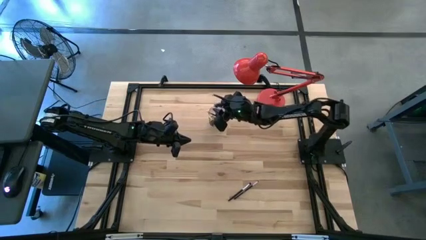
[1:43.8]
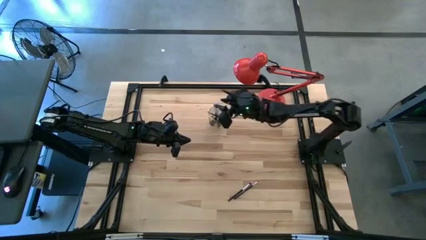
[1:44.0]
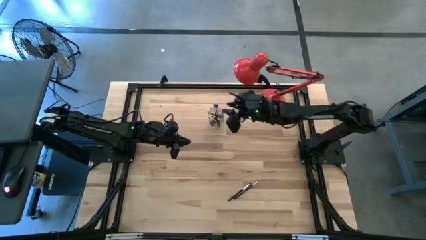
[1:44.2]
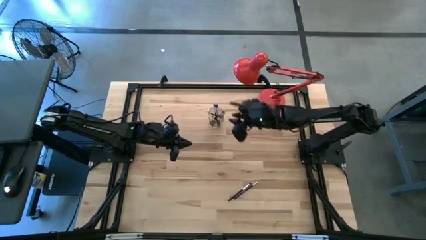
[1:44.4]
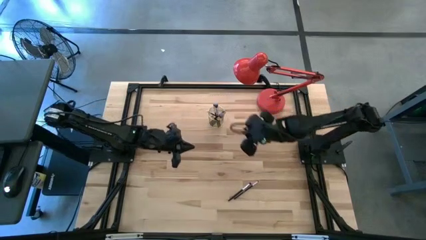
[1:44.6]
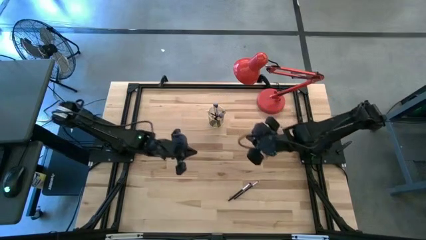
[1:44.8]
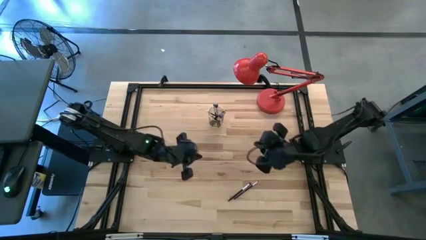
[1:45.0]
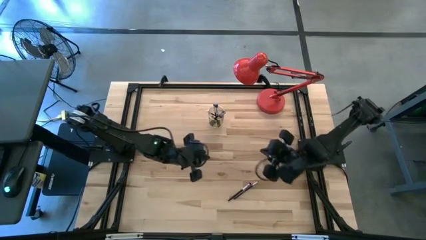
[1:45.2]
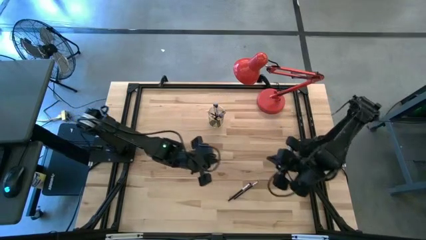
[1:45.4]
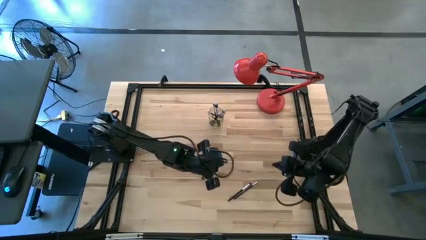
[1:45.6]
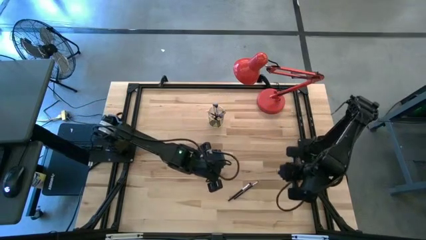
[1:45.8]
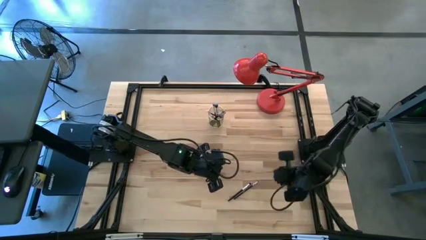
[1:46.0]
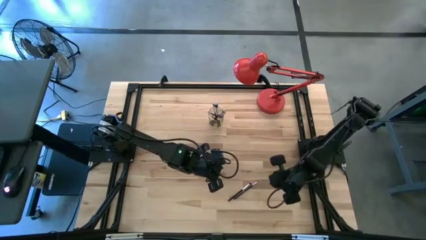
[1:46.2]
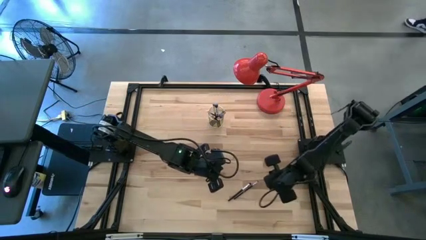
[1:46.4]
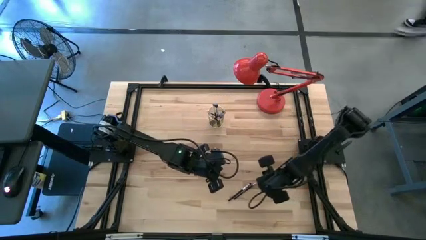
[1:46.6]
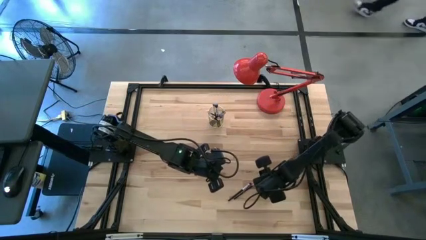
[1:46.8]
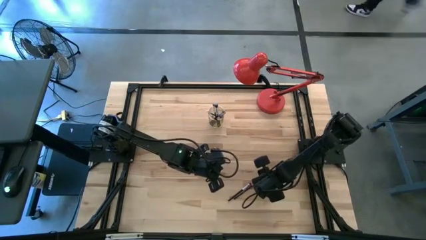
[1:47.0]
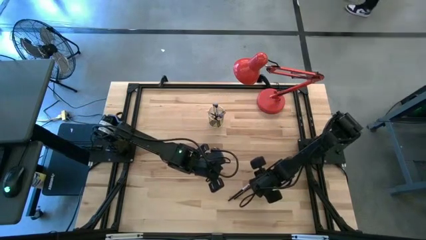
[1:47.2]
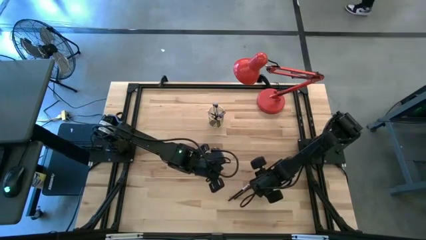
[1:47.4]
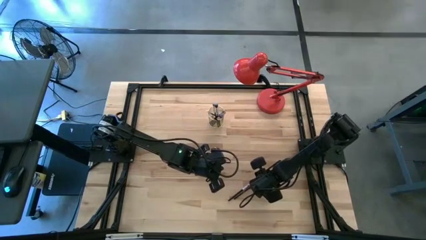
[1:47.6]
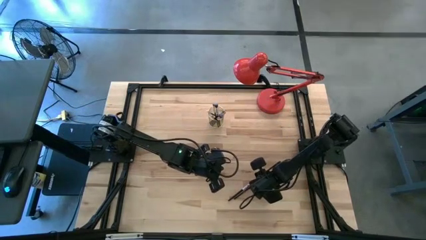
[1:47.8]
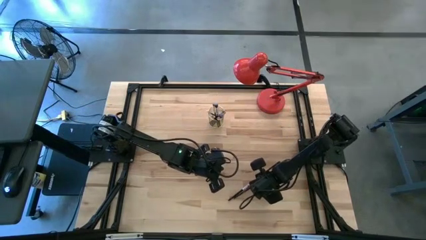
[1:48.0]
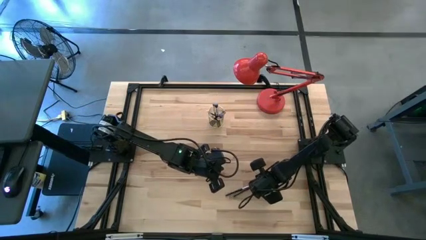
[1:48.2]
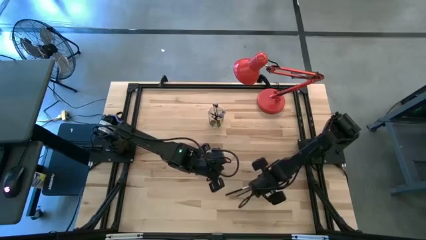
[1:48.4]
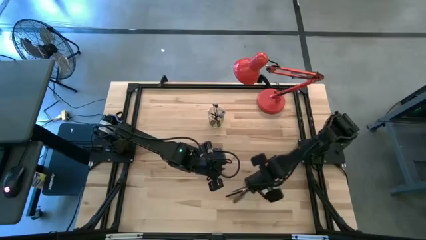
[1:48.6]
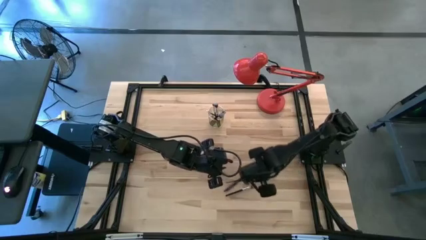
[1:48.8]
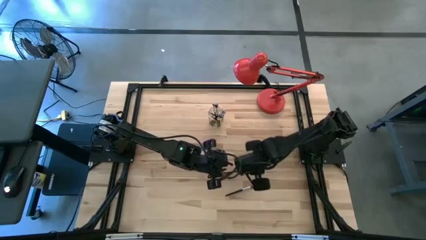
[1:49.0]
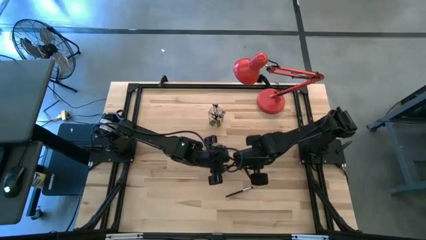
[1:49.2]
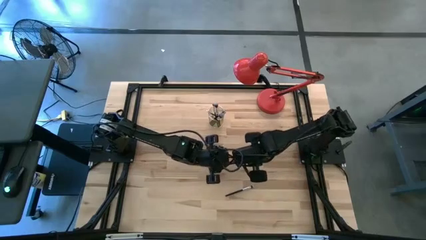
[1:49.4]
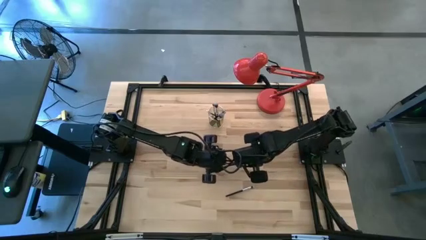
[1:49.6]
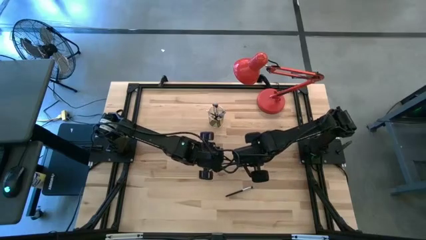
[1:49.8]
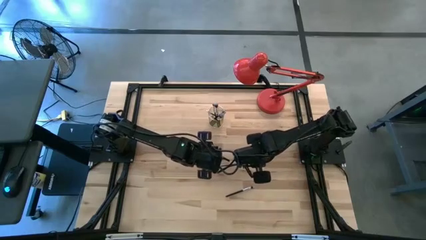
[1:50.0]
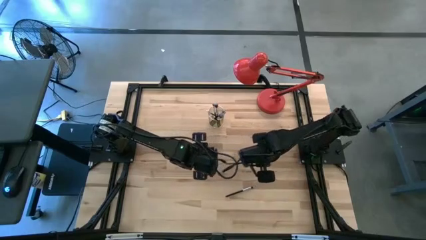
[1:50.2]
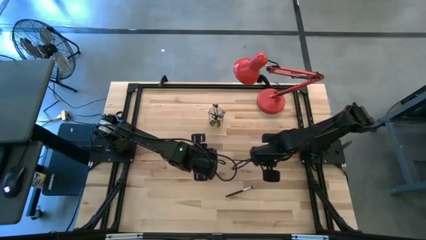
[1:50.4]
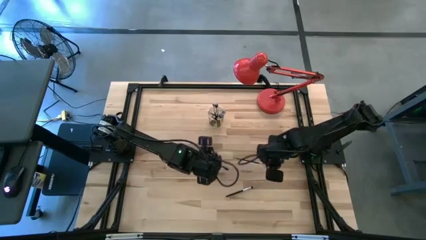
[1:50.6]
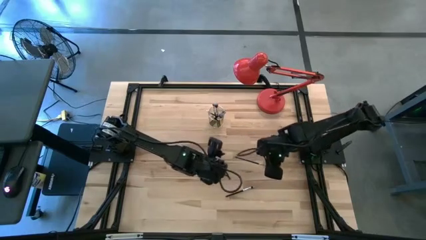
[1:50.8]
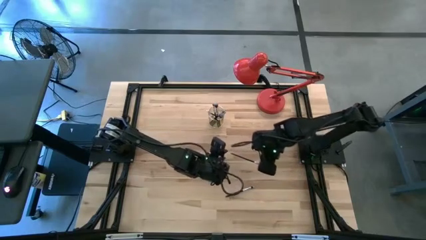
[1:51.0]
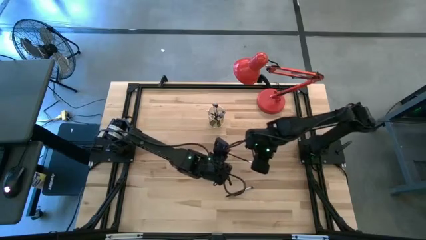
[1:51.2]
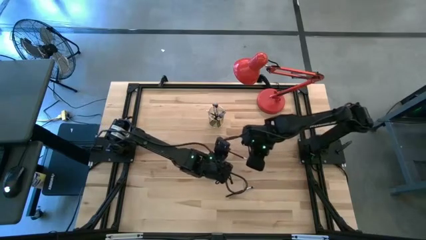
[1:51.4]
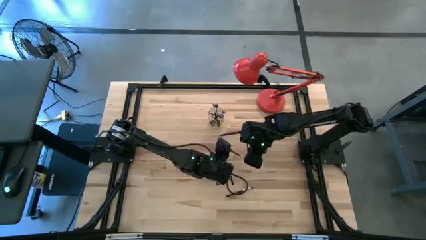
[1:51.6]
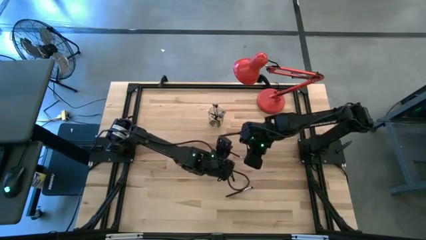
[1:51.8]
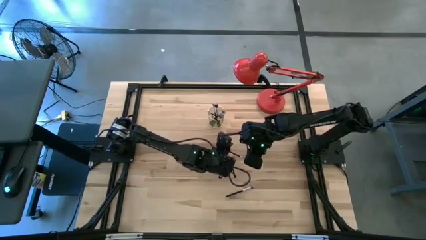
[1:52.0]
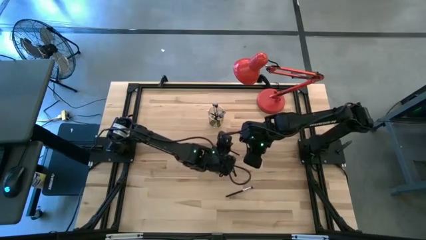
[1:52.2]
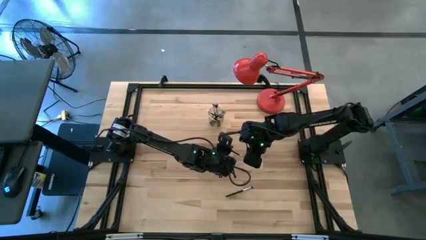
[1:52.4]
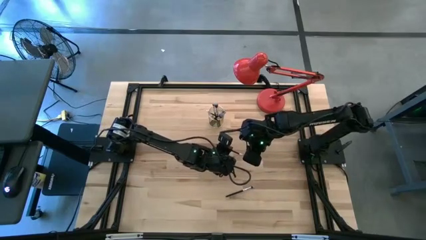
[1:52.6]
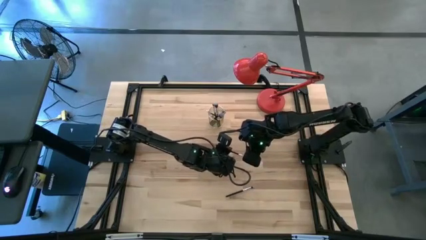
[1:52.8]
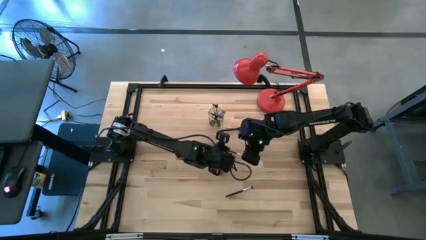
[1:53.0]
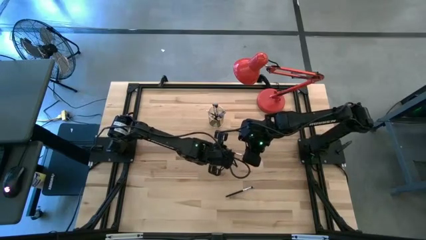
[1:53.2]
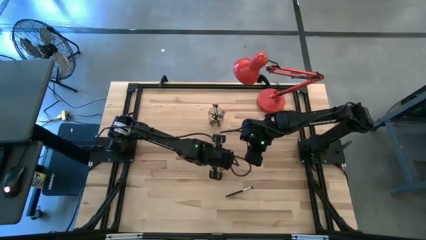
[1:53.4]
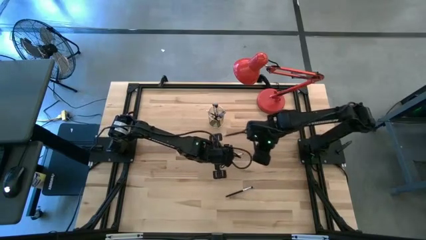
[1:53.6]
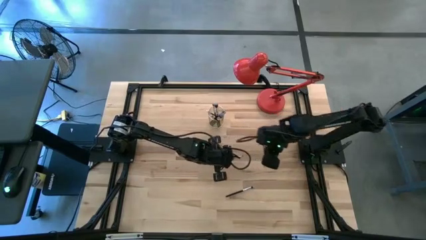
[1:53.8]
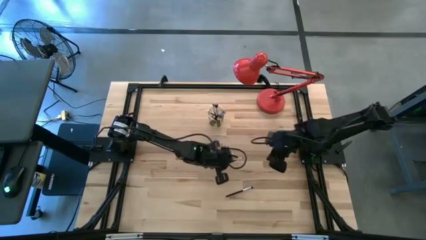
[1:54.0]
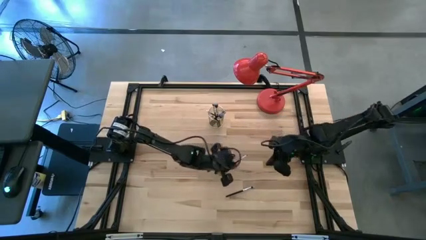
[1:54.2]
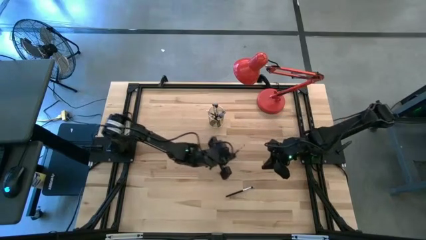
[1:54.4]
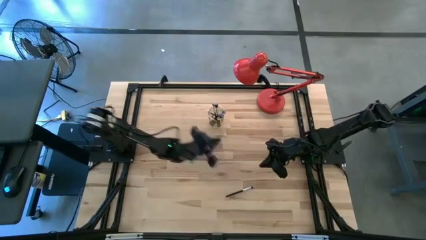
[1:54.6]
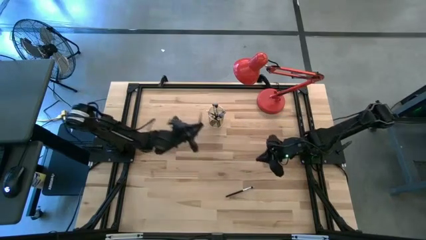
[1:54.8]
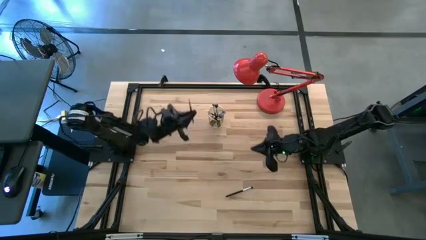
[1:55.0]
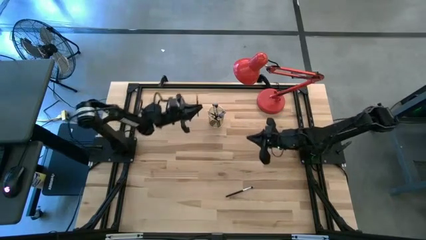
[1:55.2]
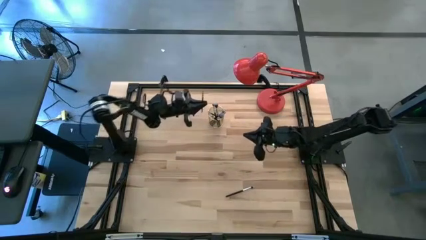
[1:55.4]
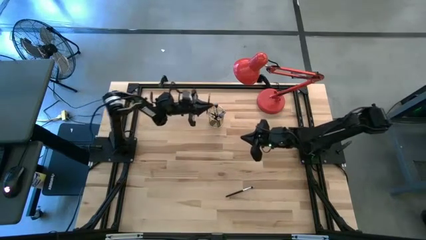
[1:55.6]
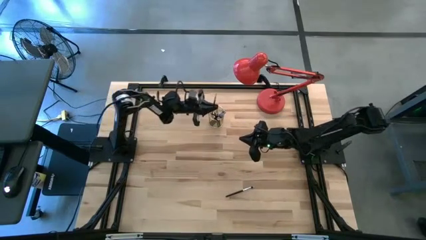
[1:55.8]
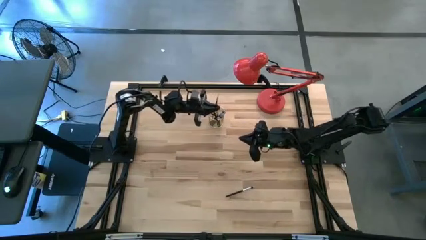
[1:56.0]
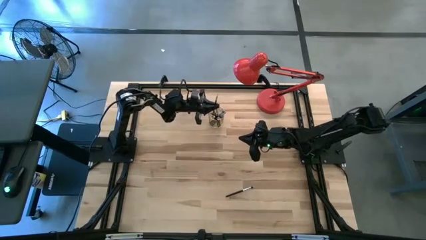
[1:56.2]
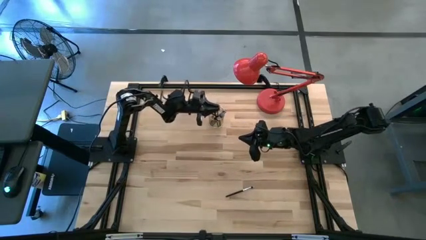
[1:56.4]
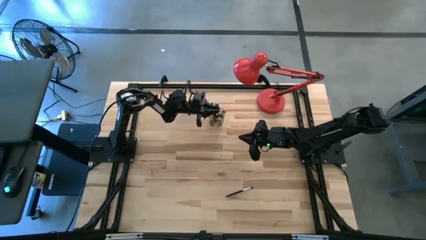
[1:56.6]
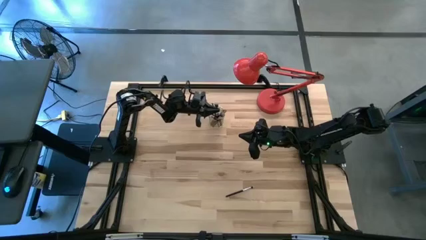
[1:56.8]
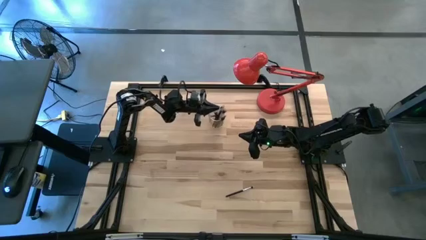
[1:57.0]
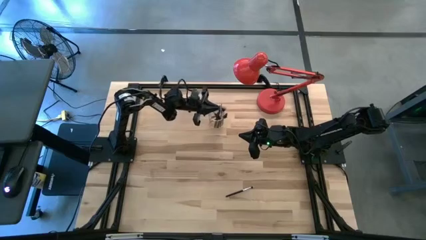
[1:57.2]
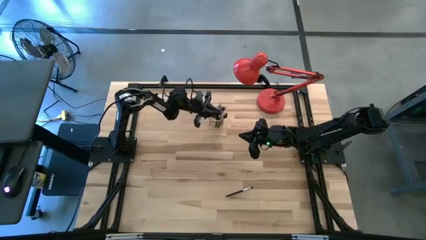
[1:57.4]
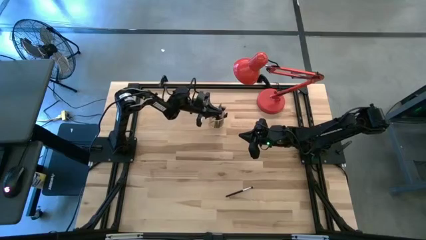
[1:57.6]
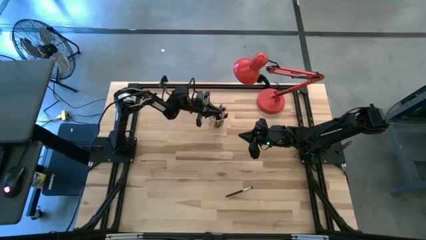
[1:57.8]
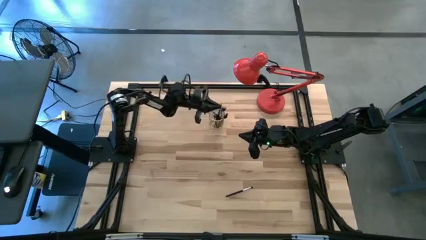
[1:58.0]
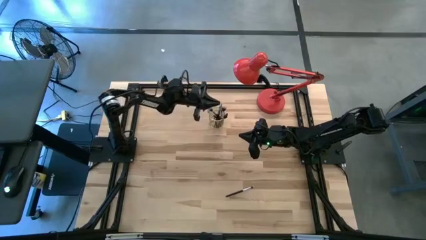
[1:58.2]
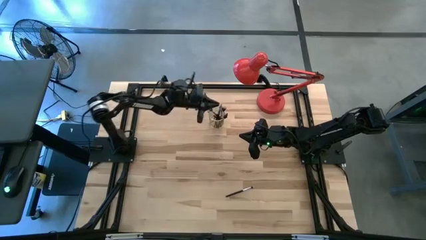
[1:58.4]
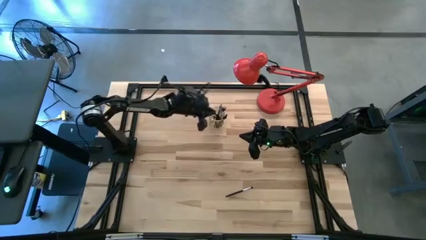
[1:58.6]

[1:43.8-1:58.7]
Task: Pick & Place Makeup Brushes
Put the eyeshadow brush into the makeup brush holder

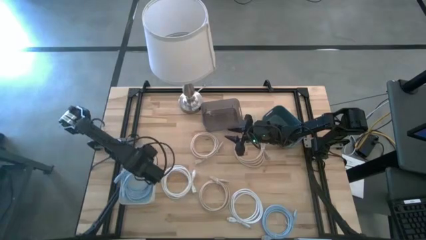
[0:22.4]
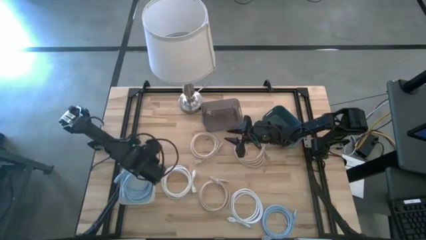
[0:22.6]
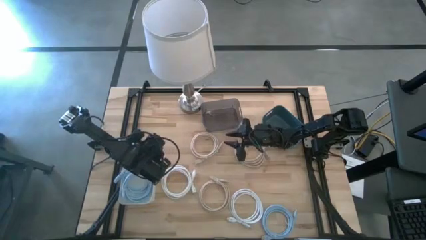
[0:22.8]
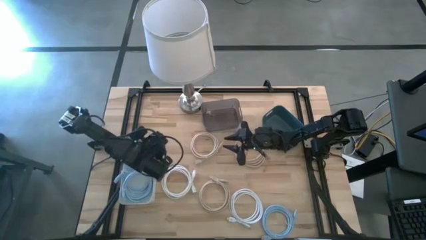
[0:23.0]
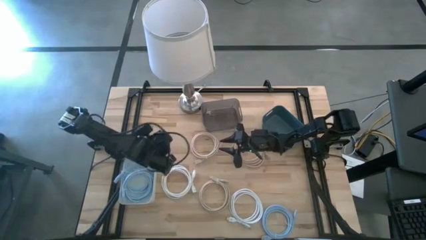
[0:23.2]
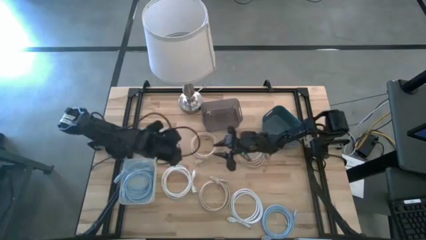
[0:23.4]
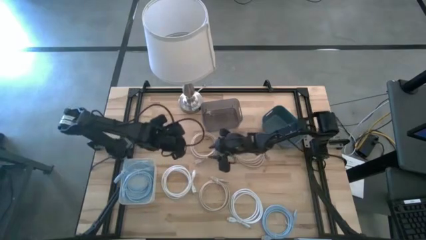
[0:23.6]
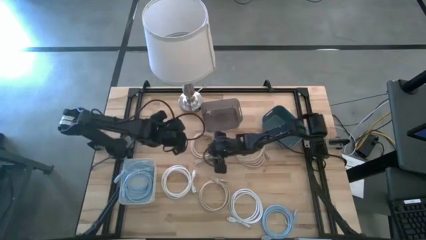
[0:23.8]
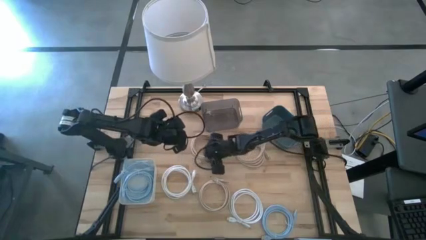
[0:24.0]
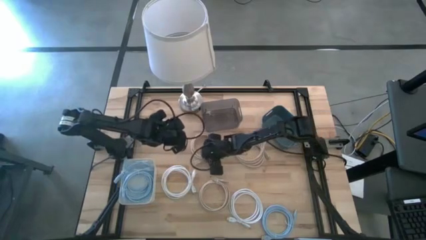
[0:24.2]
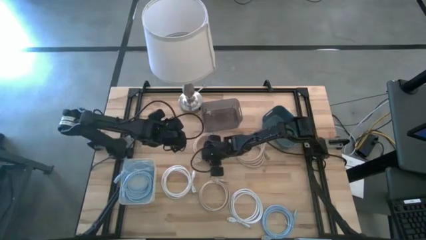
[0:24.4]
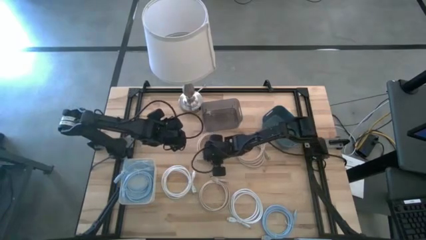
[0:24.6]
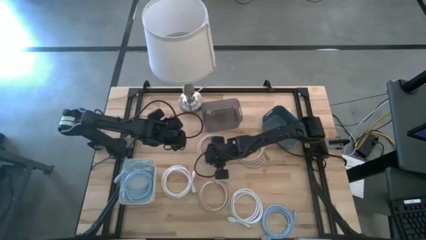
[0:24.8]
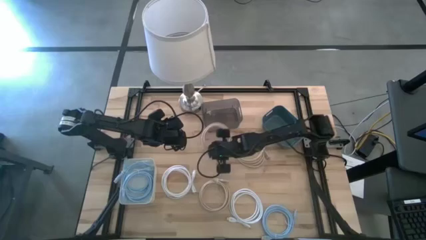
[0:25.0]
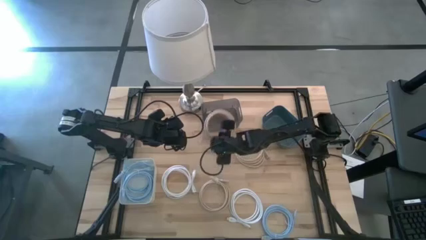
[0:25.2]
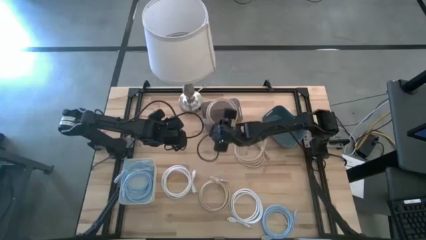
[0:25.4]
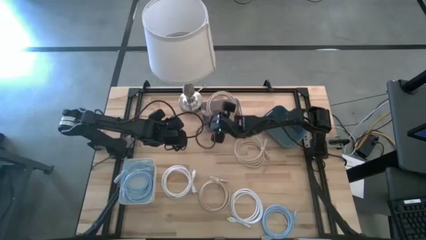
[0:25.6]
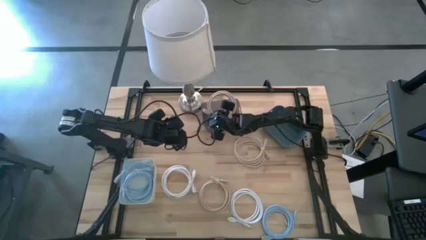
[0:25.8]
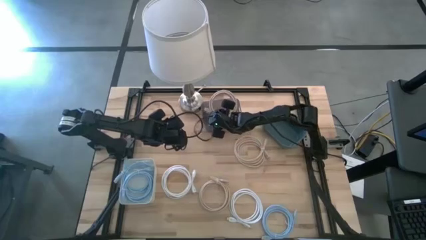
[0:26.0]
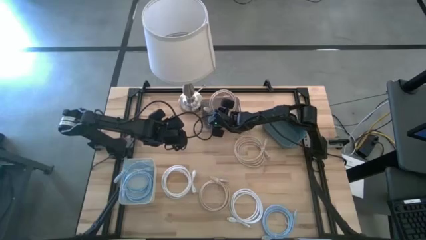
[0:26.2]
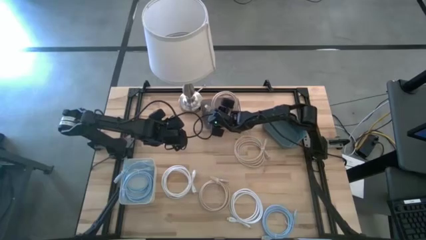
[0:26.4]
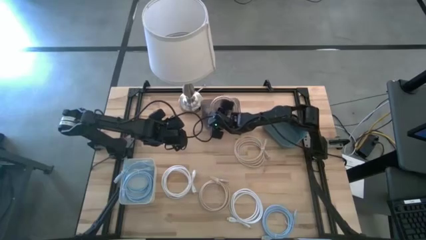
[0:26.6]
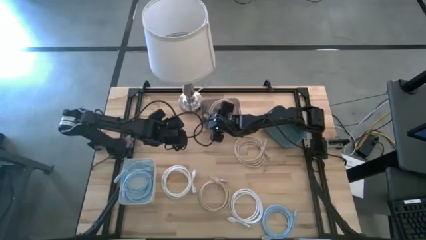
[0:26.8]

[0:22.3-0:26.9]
Task: Sort HDMI cables
Put the top left light brown HDMI cable into the black bin
